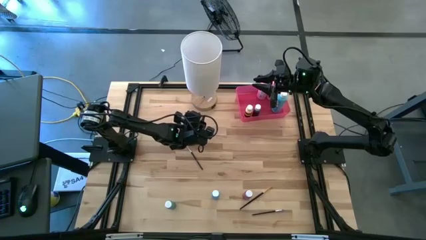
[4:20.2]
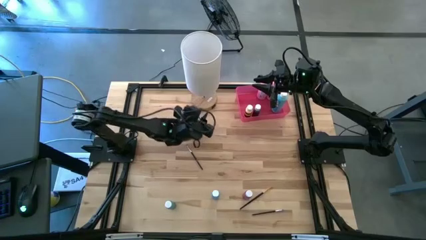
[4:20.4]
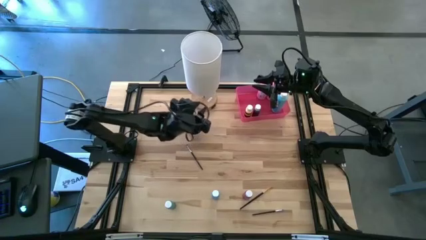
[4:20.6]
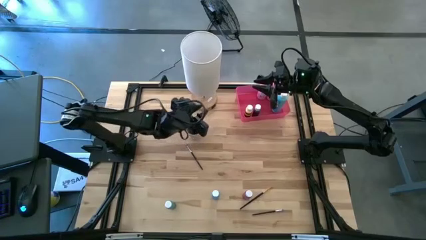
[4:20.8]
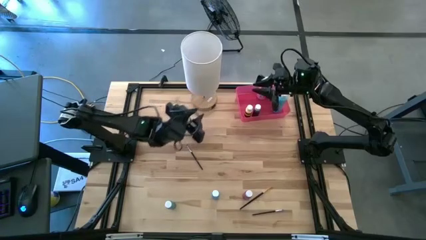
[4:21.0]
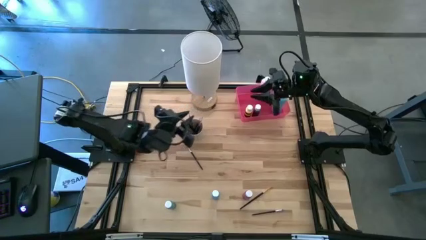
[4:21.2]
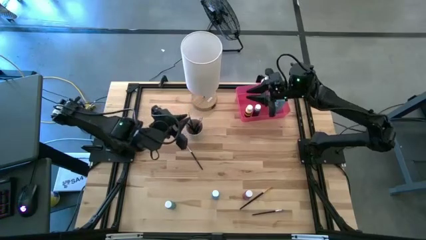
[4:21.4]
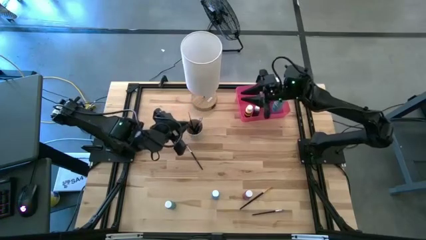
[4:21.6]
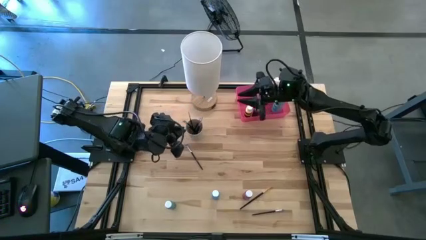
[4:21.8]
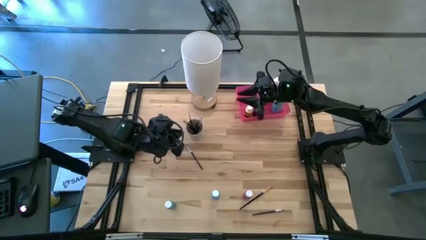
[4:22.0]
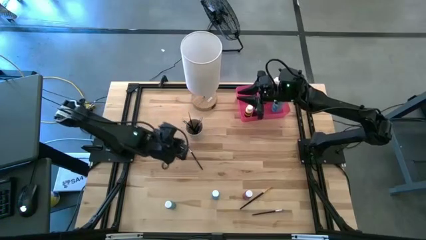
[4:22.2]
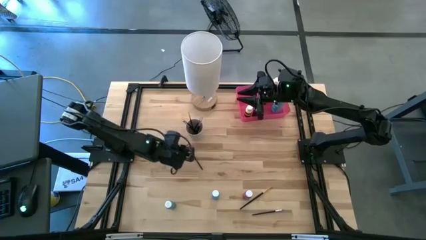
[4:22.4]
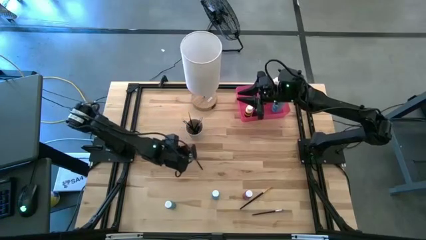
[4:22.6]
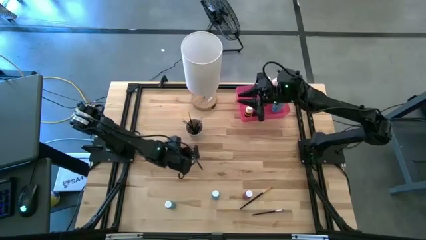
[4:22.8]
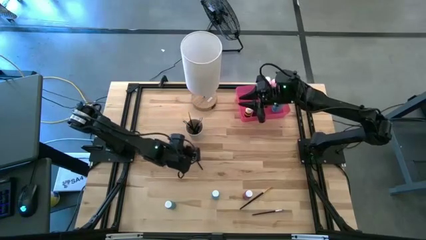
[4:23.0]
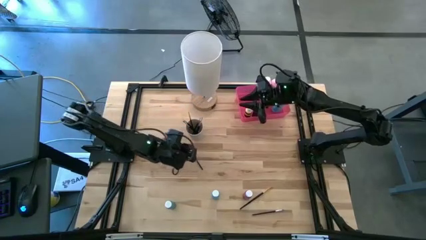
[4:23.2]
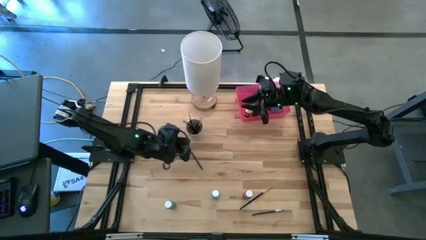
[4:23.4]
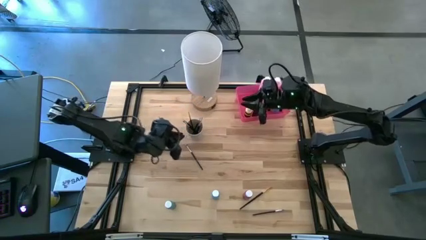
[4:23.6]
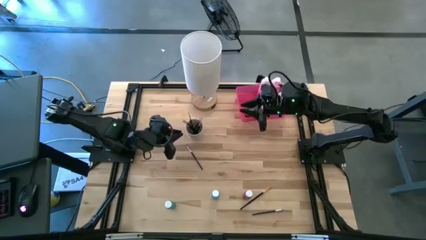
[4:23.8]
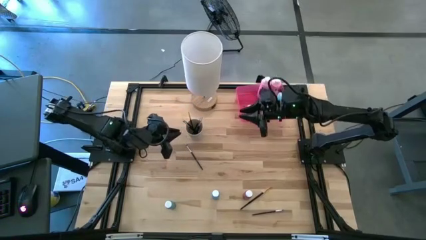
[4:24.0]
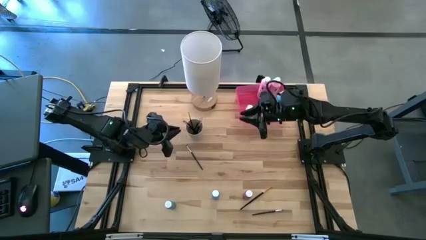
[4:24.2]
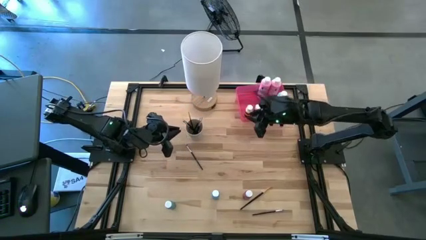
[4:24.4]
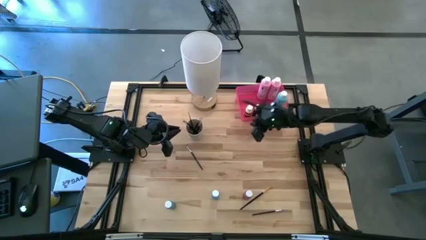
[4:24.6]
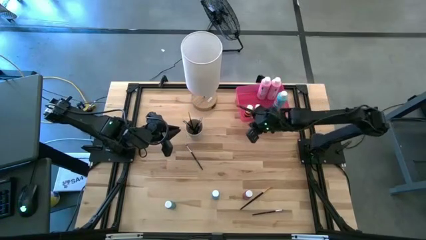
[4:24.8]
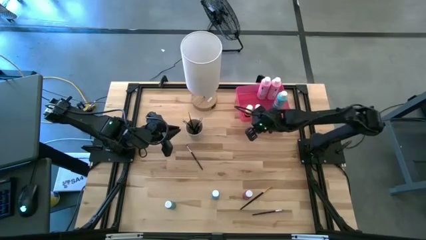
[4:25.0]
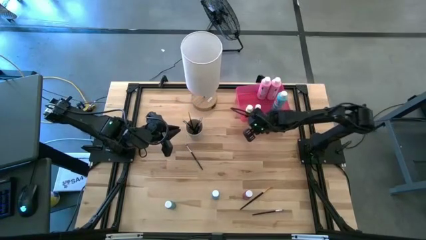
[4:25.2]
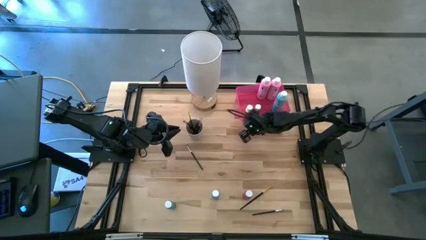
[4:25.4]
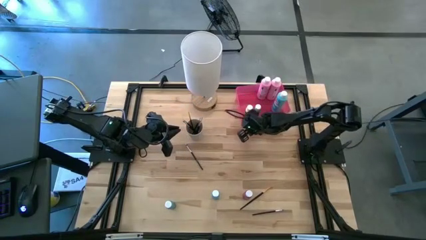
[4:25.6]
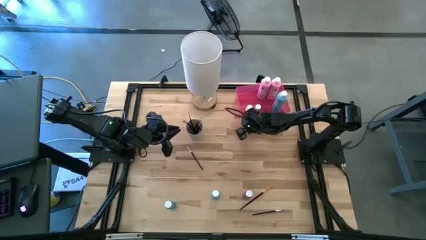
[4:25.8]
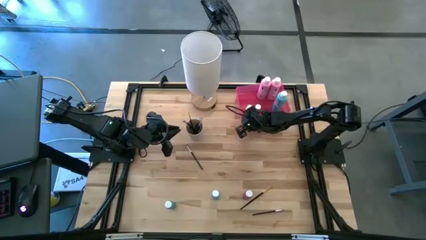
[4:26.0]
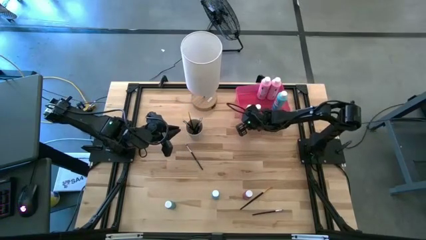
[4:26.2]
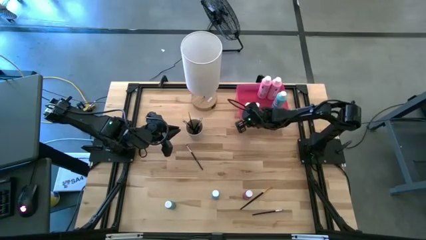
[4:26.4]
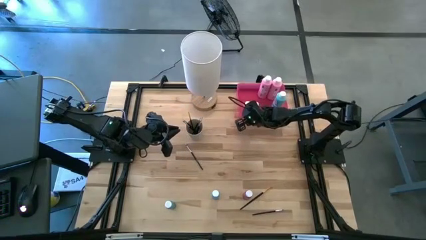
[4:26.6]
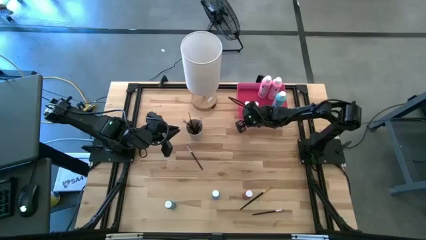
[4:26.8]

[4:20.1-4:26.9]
Task: Pick & Place Paint Supplies
Adjust the pink bin

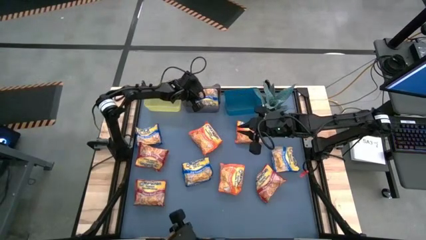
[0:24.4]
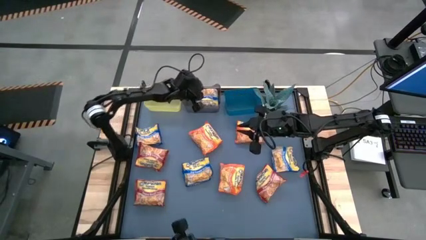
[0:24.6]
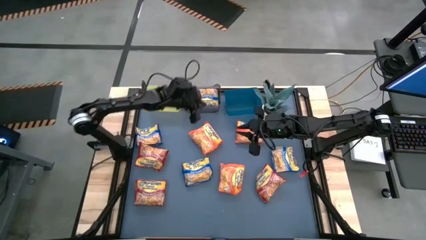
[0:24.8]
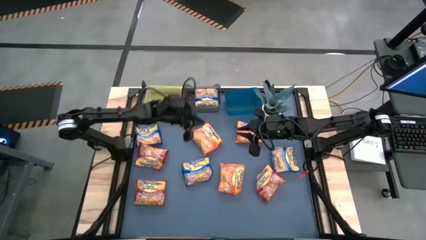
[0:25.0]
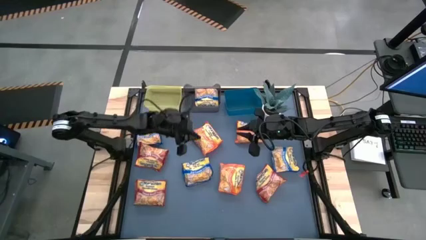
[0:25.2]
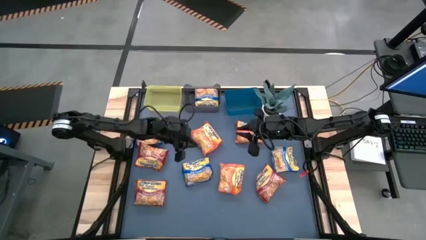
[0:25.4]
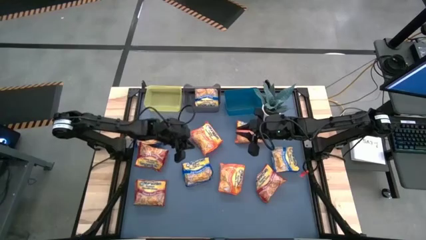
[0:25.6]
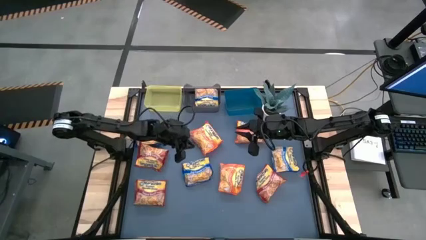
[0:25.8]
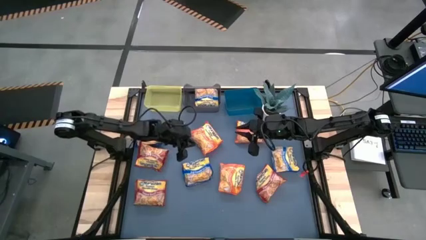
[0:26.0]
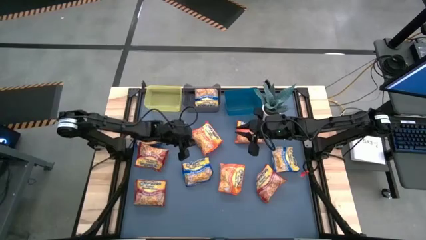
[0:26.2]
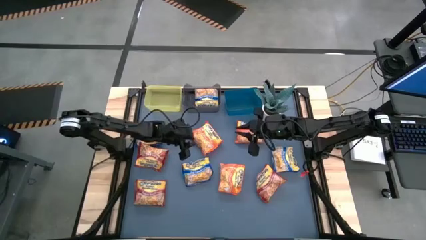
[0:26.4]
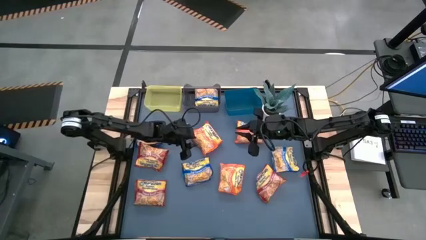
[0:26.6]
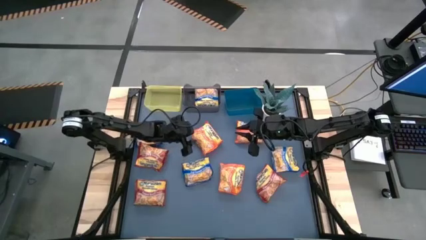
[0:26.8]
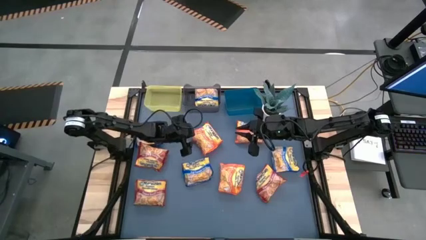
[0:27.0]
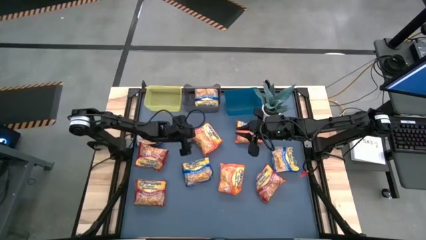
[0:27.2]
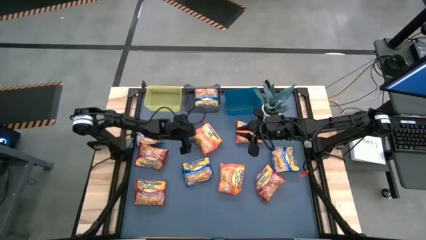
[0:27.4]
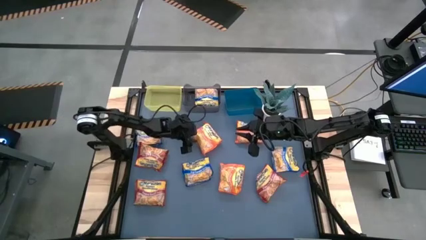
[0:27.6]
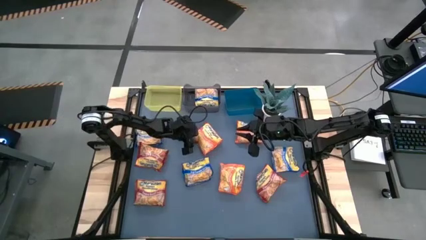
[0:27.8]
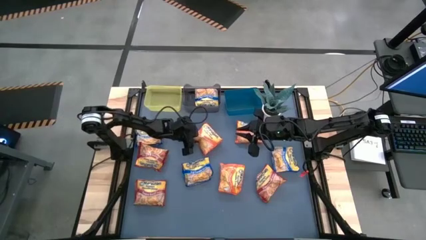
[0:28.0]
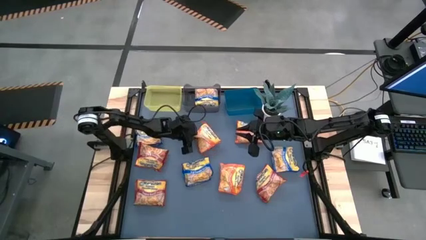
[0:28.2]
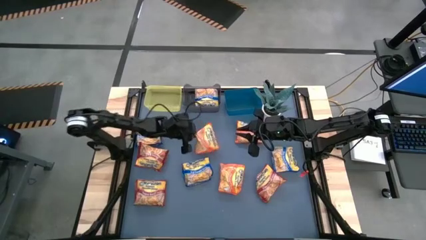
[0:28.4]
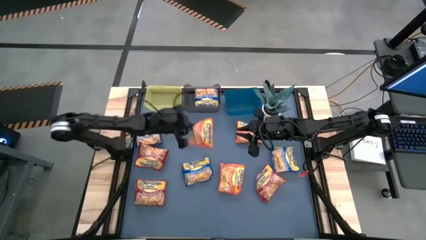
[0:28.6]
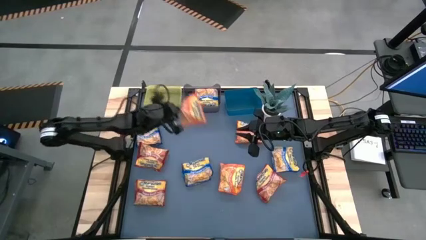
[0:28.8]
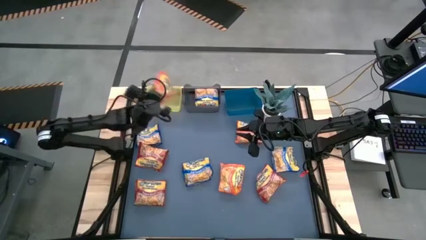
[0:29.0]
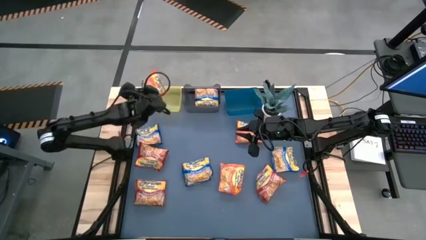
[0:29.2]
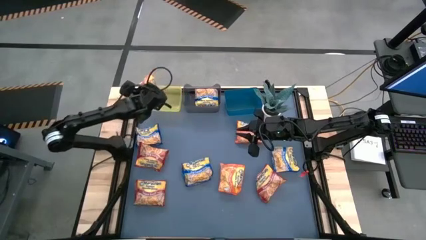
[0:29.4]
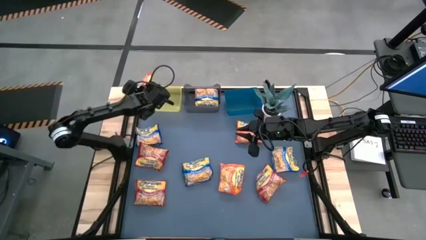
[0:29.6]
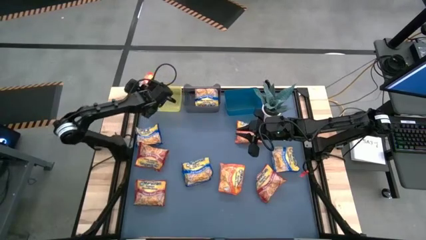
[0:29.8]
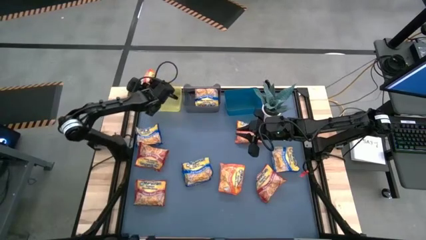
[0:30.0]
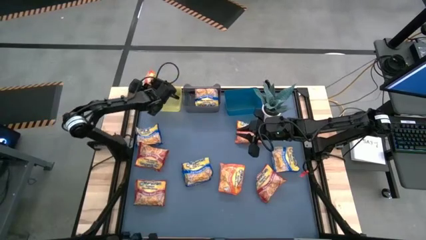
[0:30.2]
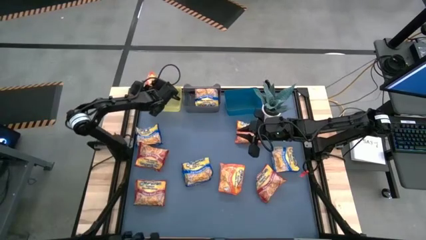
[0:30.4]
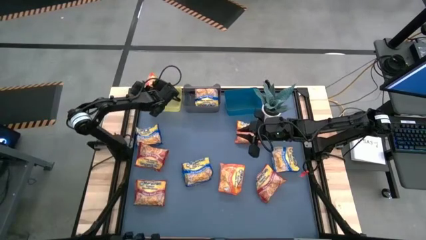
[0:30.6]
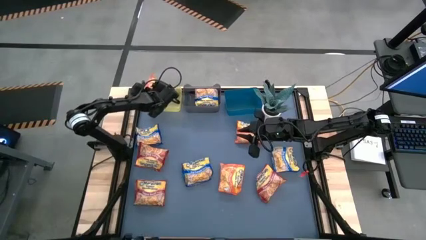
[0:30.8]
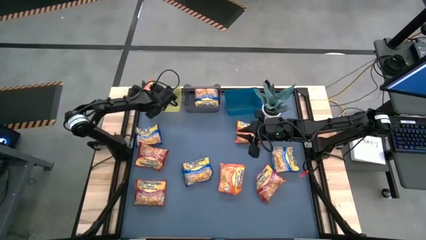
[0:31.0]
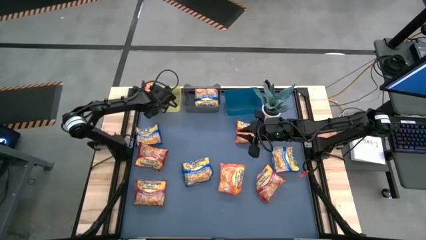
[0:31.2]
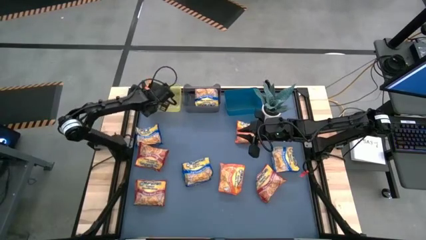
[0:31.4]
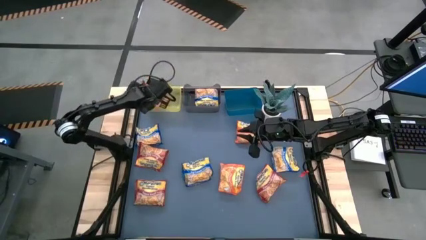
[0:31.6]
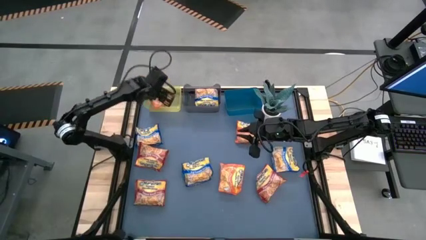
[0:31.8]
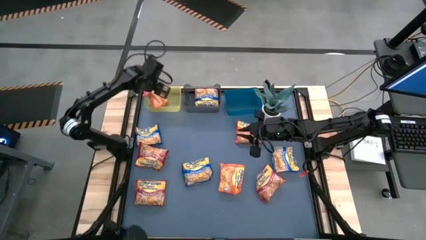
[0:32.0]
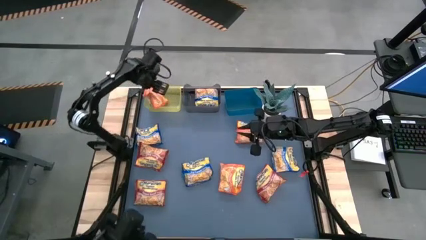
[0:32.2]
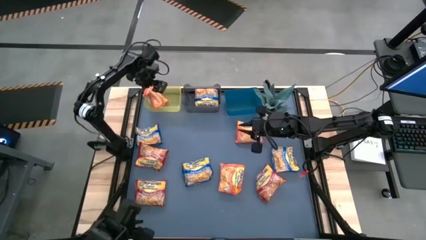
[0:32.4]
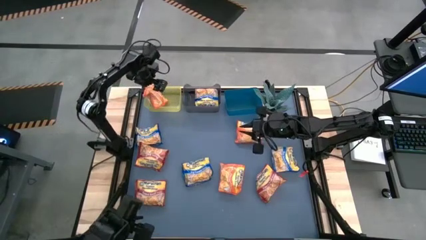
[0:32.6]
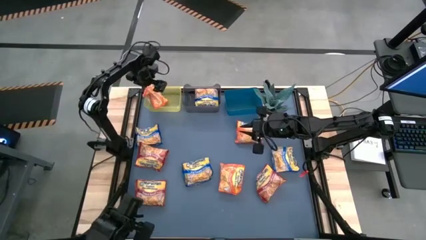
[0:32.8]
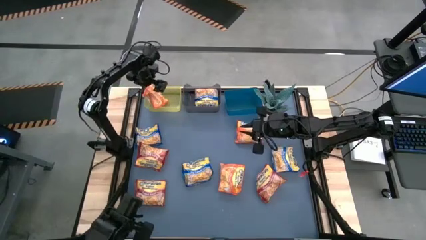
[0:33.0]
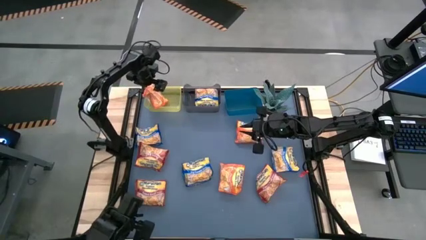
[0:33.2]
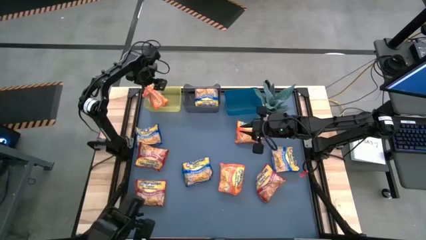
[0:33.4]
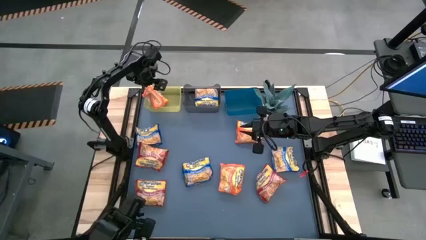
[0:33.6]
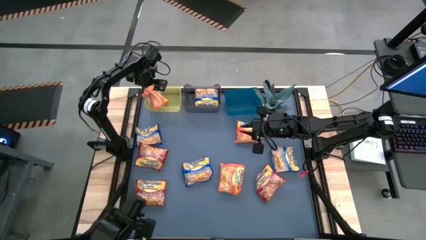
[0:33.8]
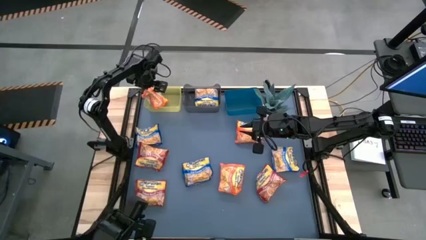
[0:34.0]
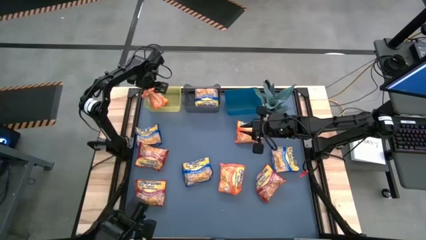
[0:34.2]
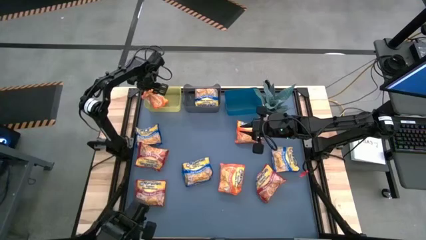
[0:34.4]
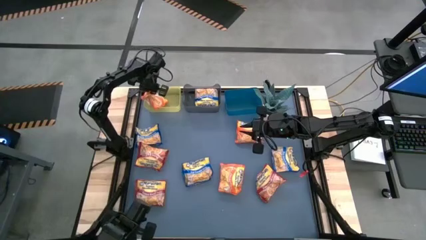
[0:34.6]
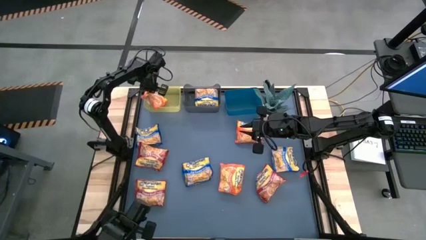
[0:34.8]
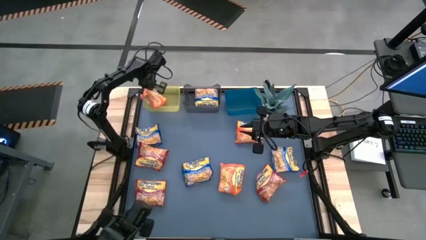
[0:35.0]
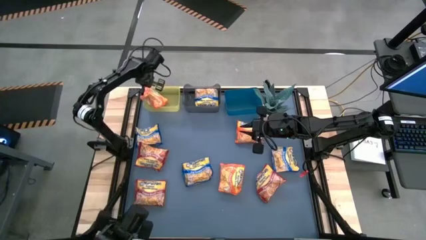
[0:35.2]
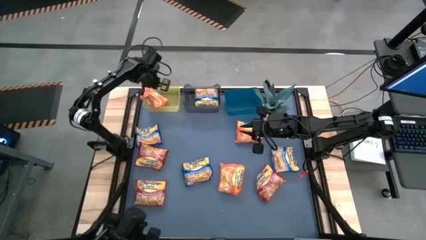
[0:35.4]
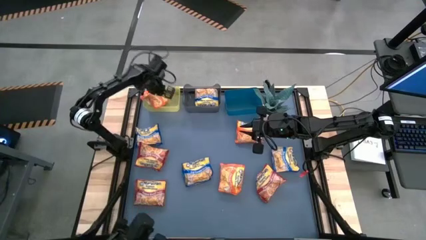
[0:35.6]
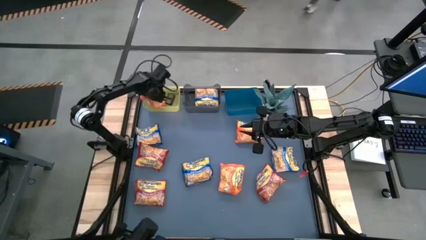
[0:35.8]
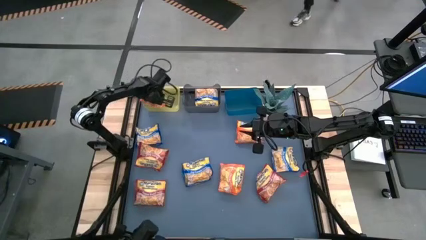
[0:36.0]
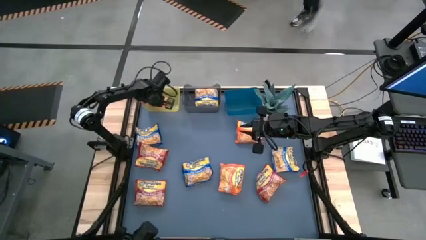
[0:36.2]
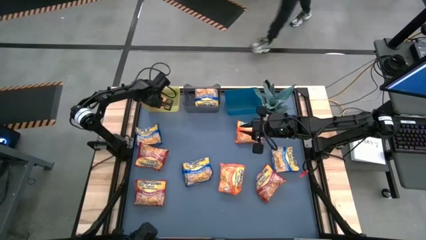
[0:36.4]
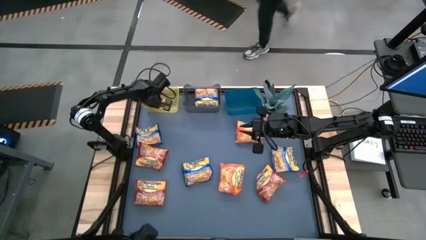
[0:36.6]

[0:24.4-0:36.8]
Task: Sort Maruchan noodles
Put the orange noodle pack into the yellow bin
